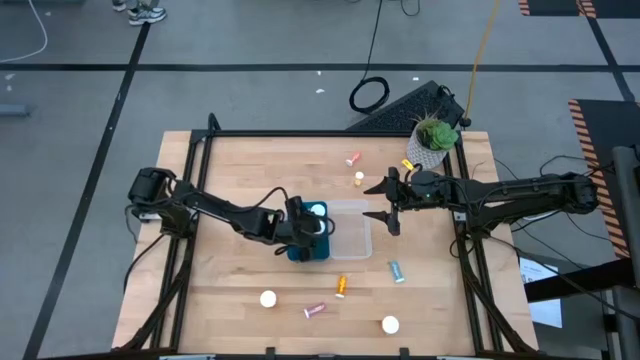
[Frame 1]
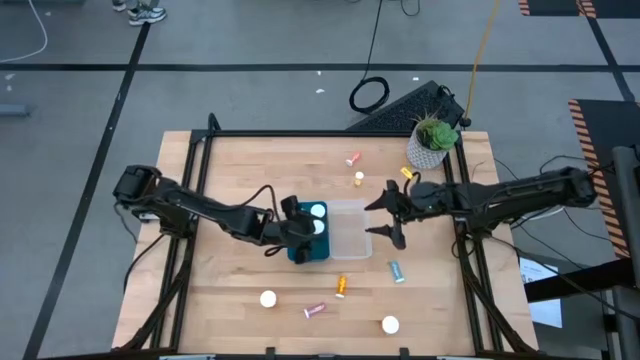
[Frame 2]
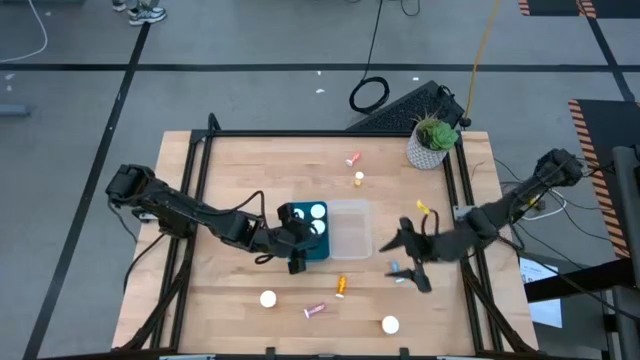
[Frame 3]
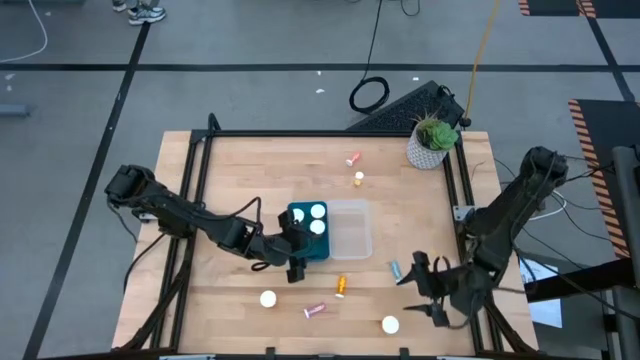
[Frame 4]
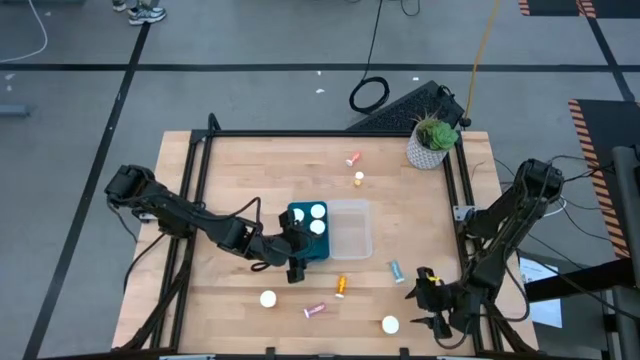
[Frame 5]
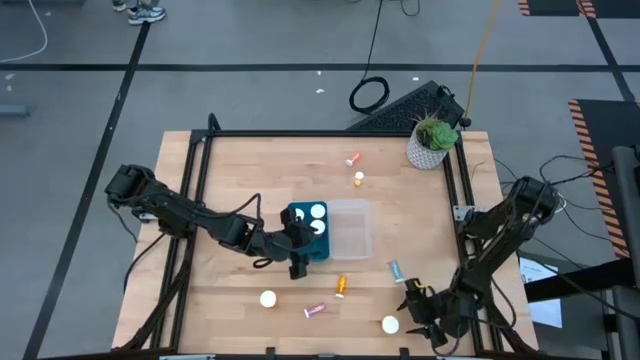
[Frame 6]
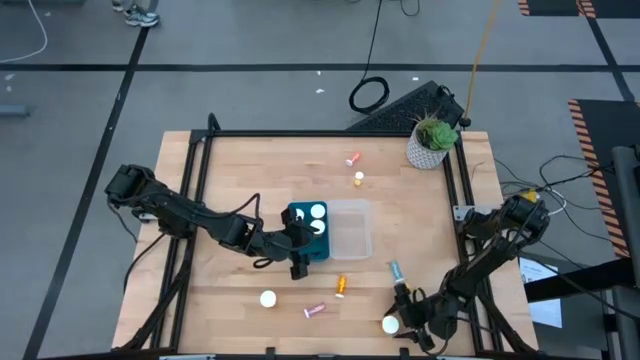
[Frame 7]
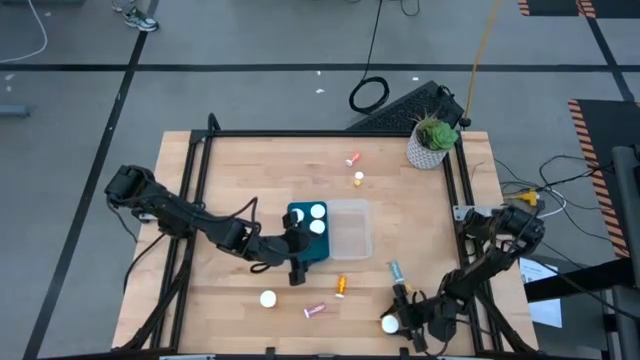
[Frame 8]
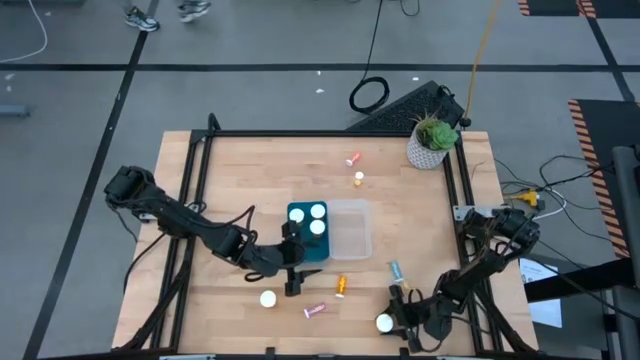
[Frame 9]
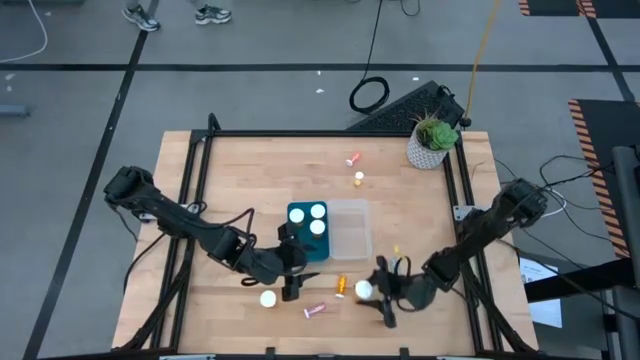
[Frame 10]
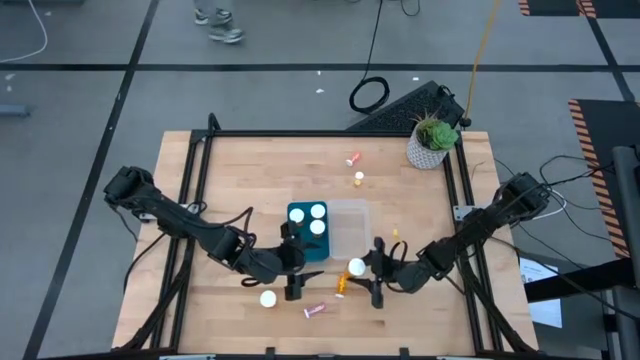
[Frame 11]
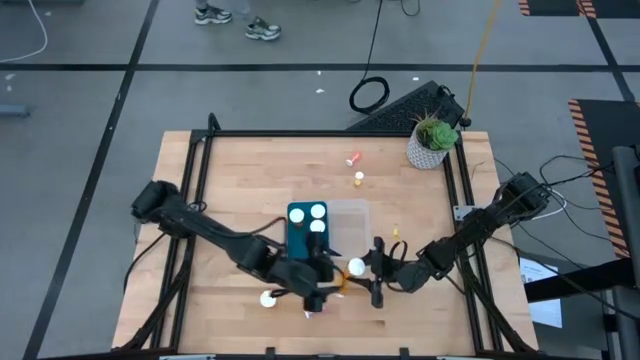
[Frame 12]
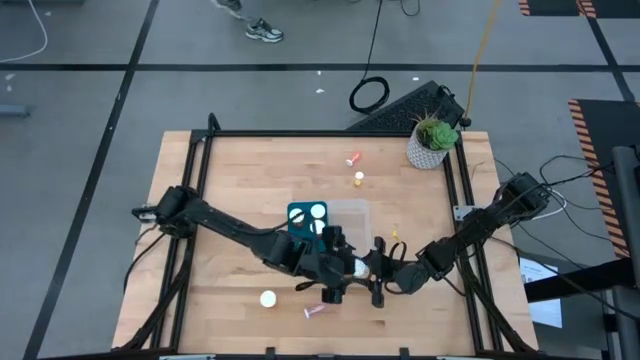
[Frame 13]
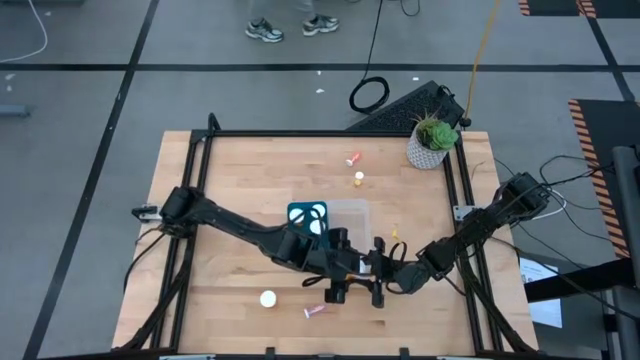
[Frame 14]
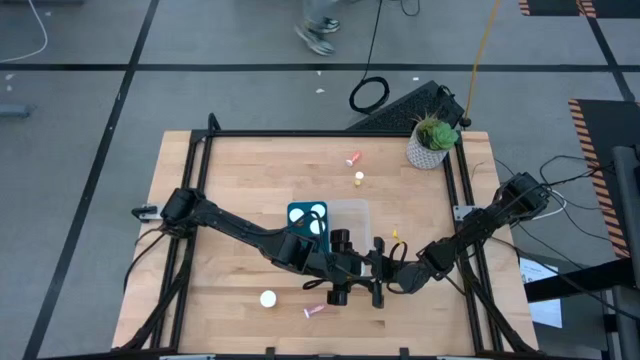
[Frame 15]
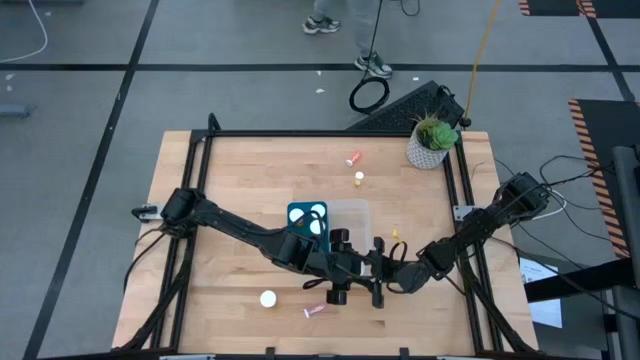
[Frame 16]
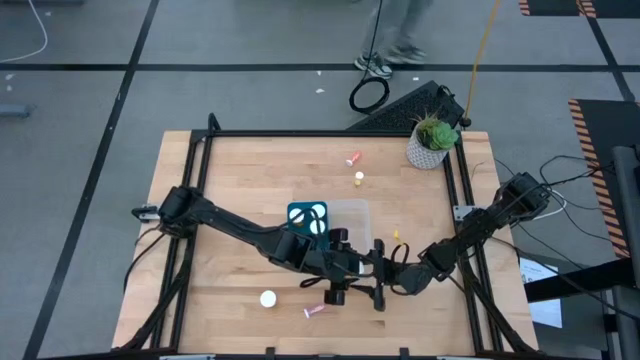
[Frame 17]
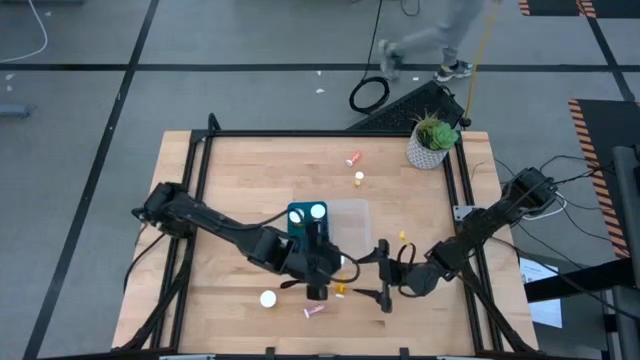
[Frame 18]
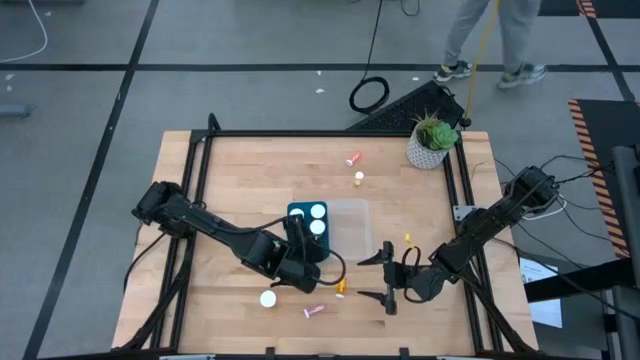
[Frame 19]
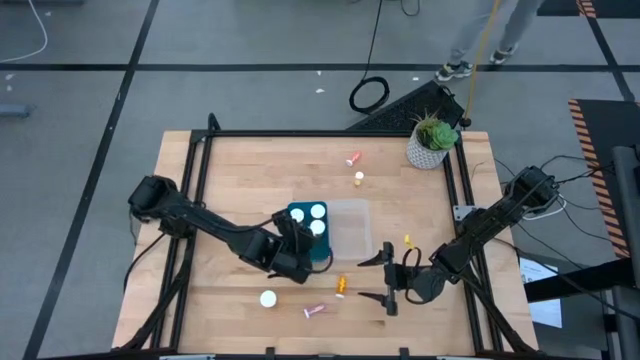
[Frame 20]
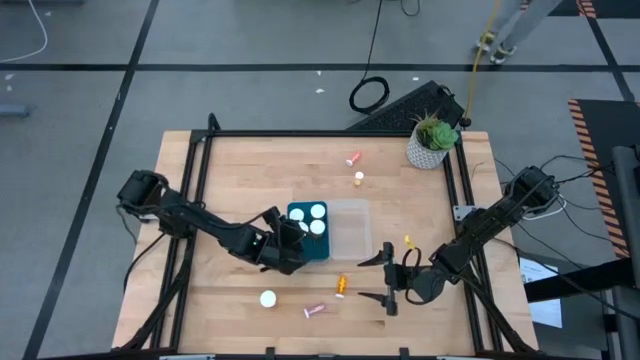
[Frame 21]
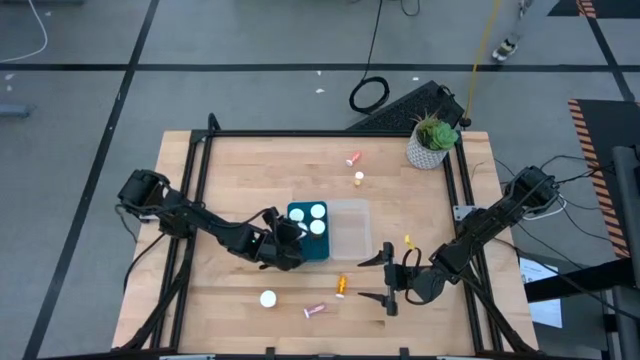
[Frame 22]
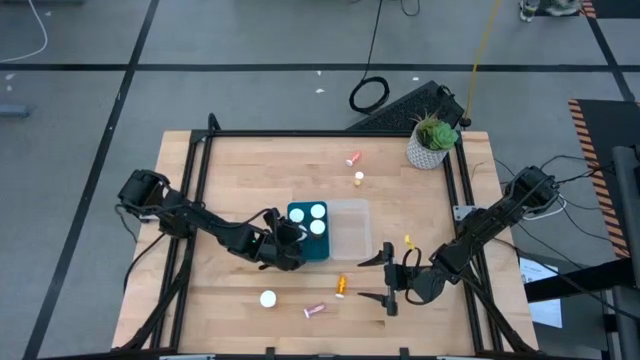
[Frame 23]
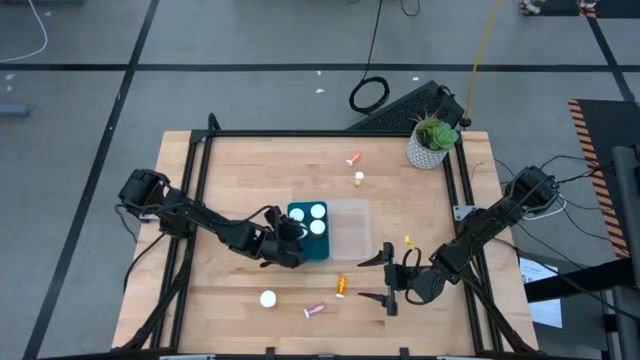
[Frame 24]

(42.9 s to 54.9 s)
Task: Pick and place medicine bottles into bin by pill shape (circle, oval)
Put the large orange pill bottle into the blue transparent bin

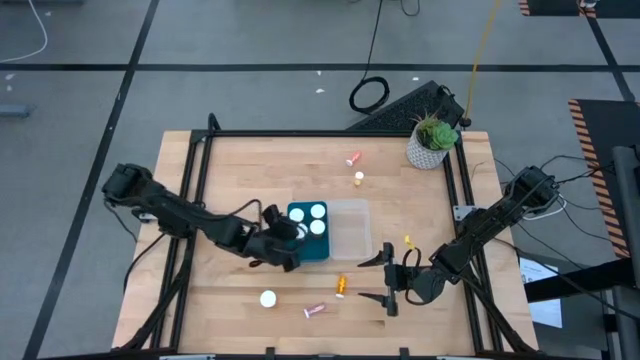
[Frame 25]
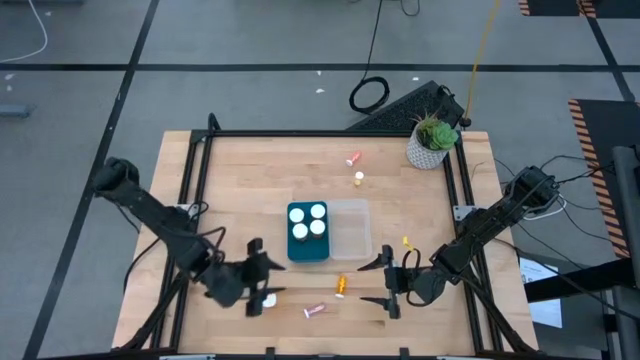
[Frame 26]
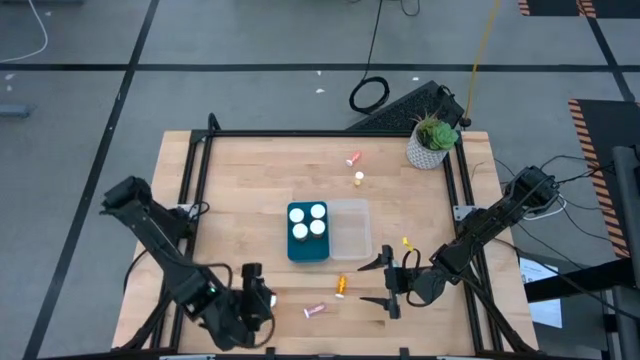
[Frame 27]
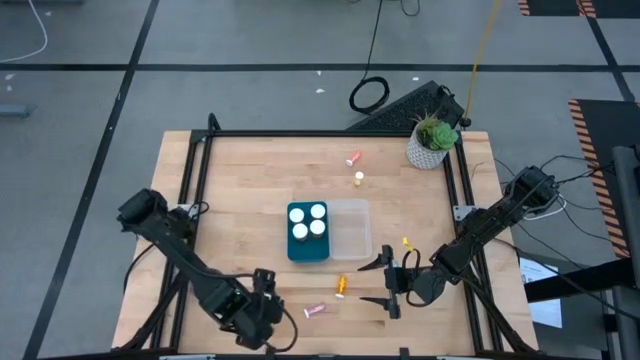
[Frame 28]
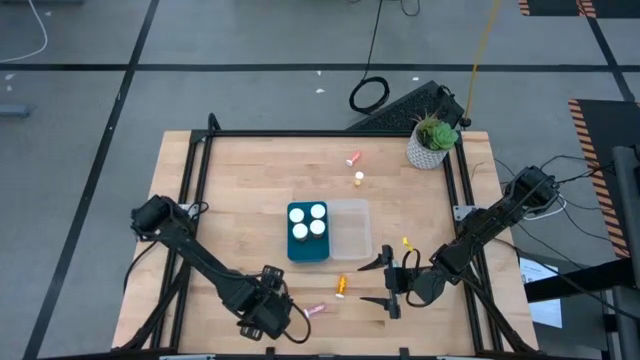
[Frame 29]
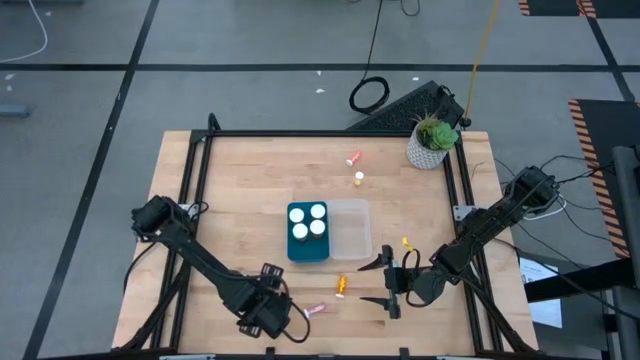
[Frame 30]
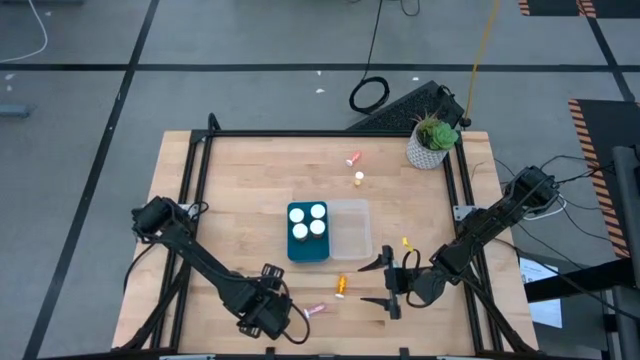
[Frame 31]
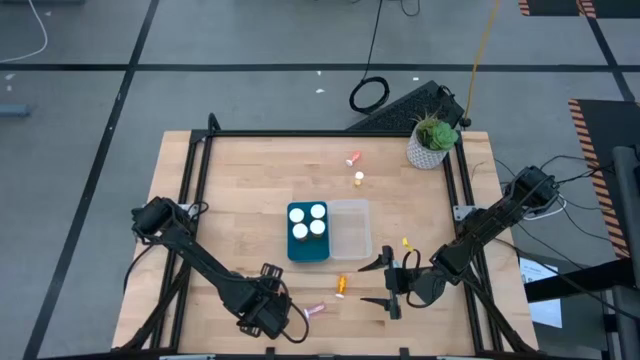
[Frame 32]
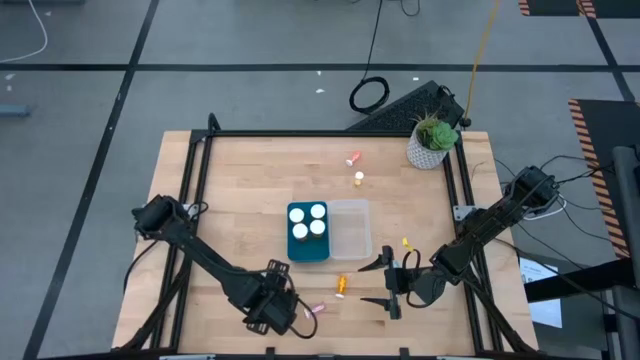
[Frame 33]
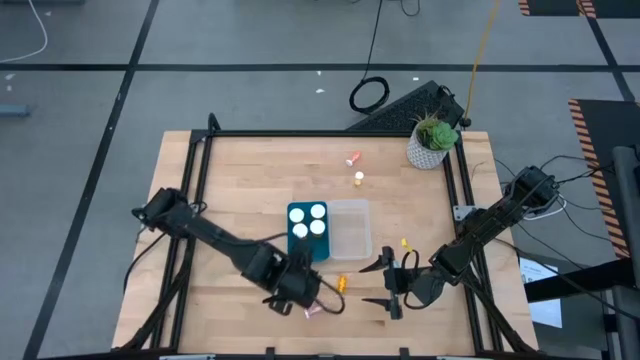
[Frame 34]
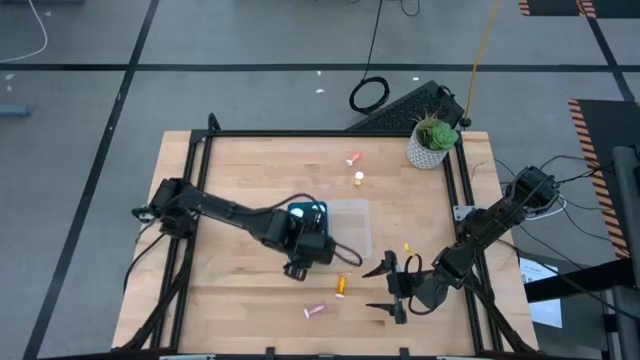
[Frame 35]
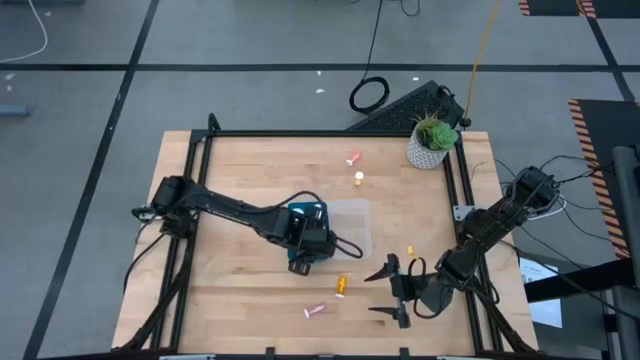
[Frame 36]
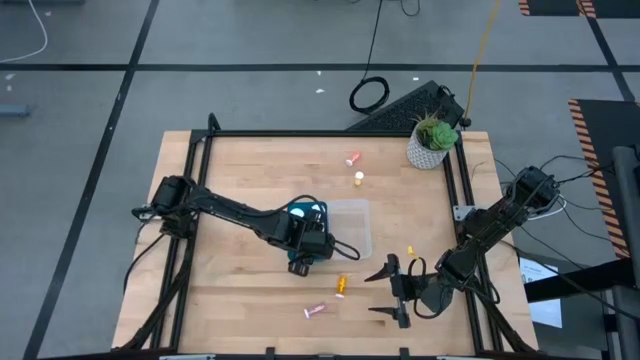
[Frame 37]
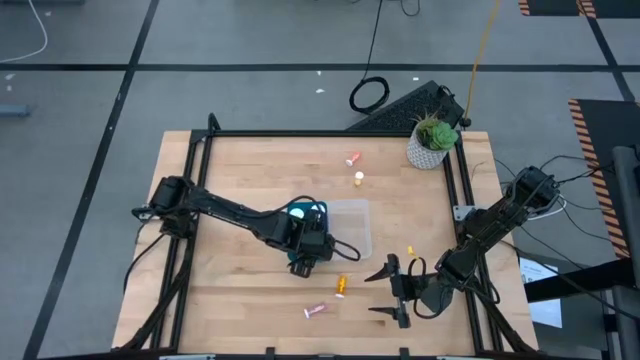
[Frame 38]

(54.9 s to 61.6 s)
Put the large orange pill bottle into the blue transparent bin

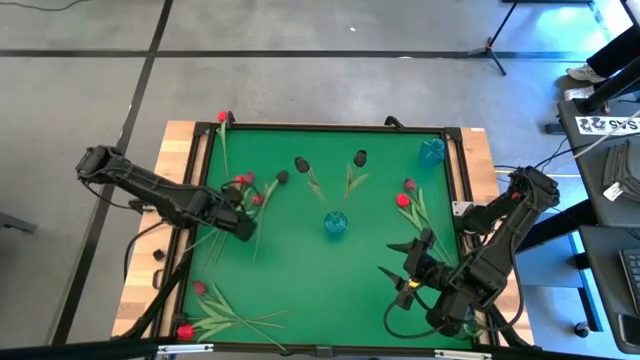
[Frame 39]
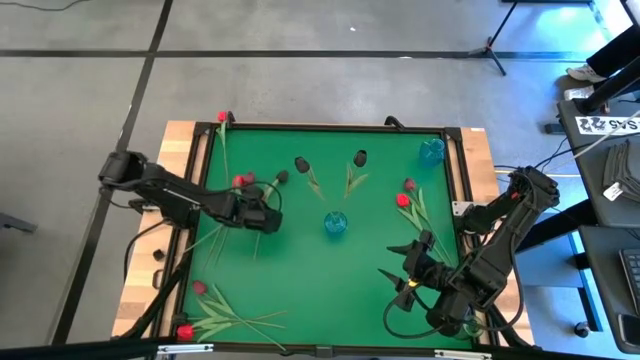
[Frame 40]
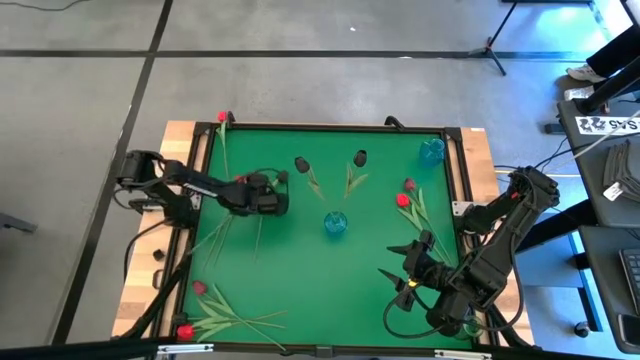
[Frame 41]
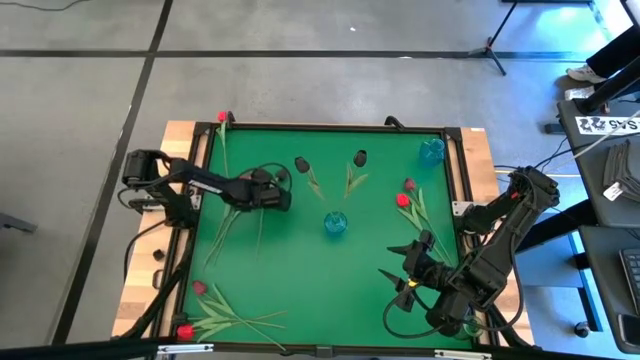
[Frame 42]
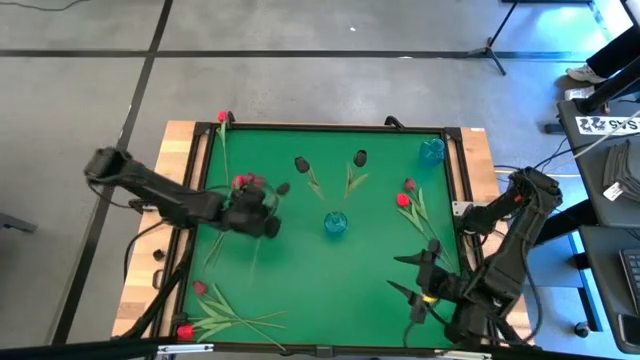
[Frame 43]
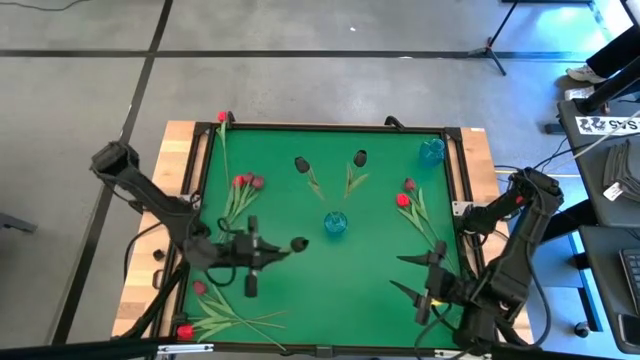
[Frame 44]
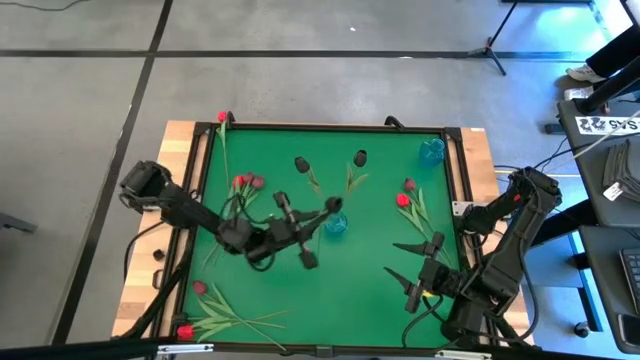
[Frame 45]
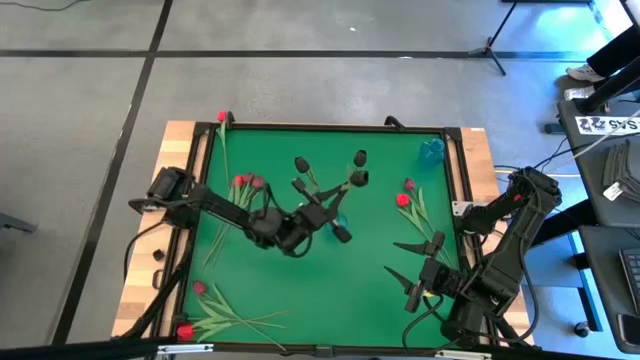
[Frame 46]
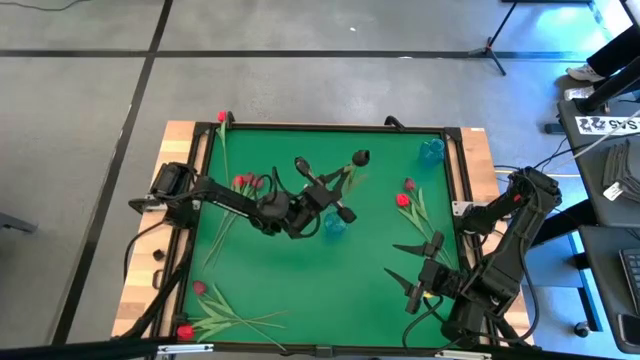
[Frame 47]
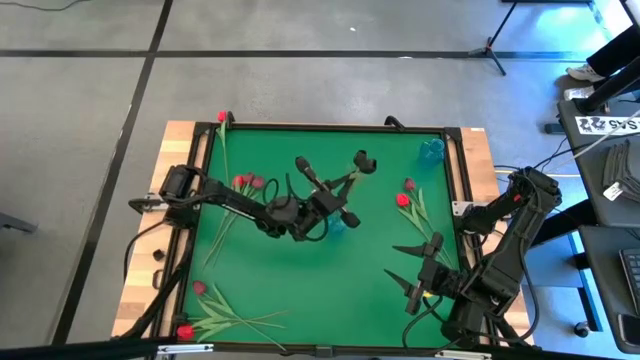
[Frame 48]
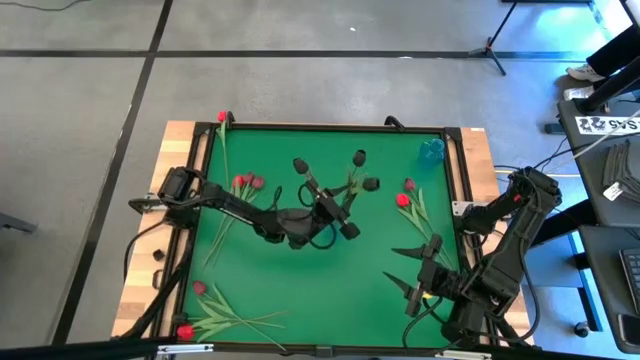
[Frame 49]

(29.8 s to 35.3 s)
Task: Sort flowers into vase by color
Put the black tulip into the bottom blue vase
